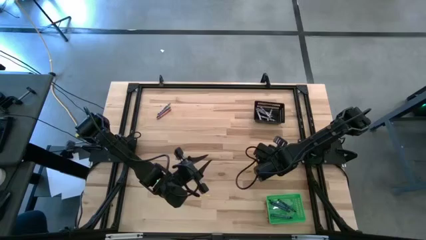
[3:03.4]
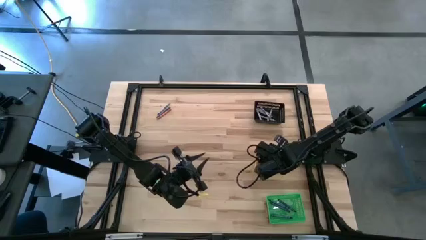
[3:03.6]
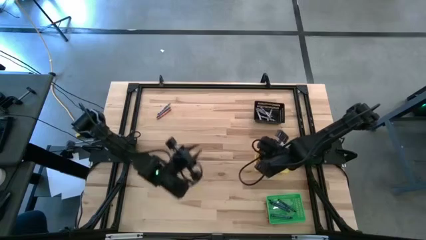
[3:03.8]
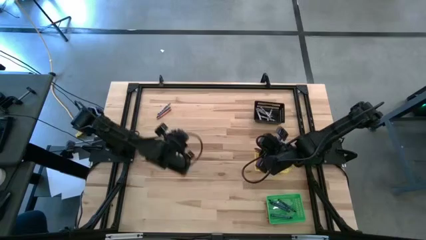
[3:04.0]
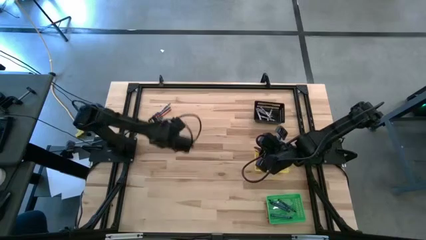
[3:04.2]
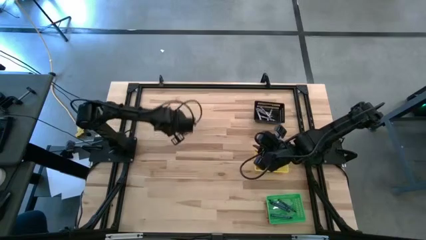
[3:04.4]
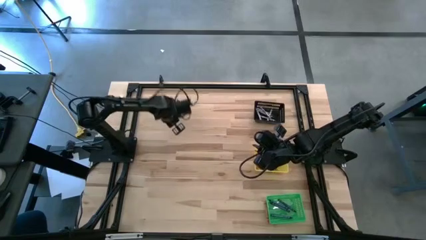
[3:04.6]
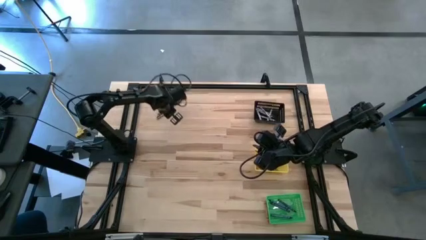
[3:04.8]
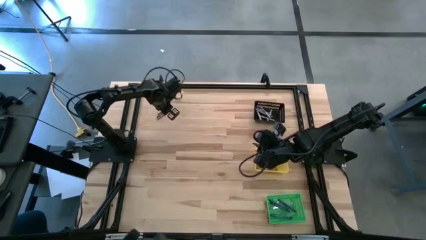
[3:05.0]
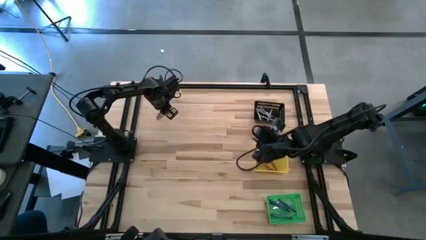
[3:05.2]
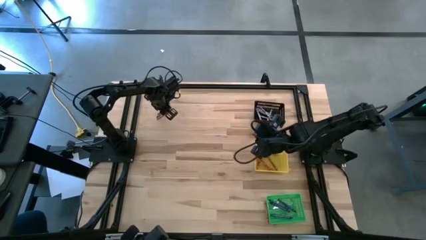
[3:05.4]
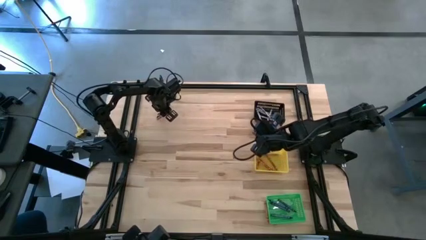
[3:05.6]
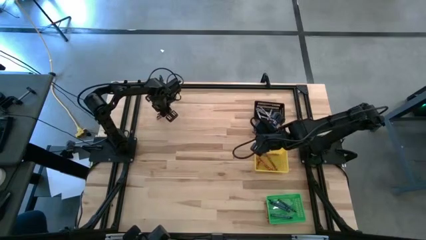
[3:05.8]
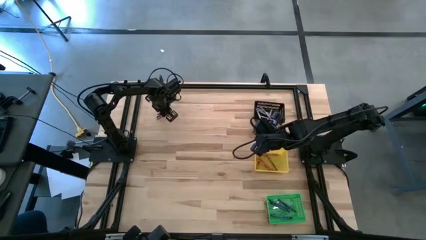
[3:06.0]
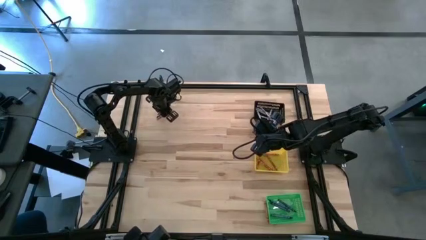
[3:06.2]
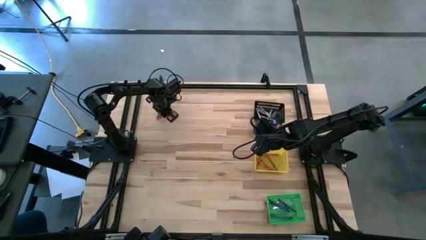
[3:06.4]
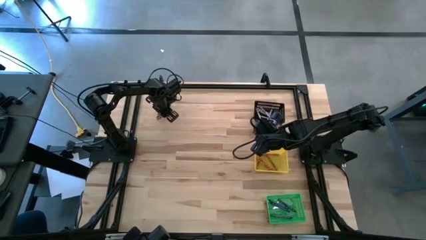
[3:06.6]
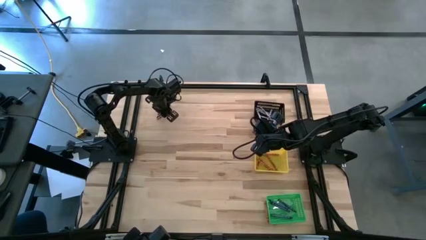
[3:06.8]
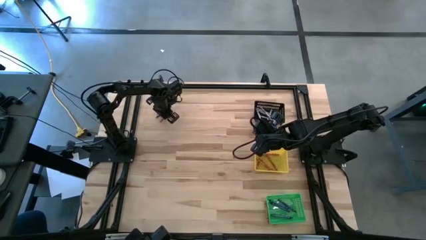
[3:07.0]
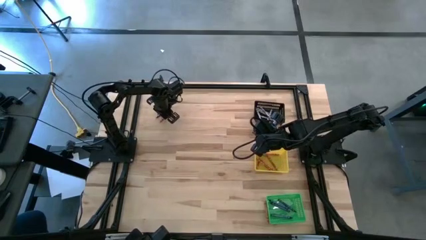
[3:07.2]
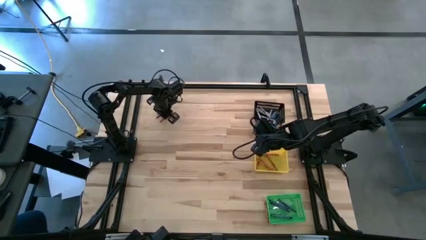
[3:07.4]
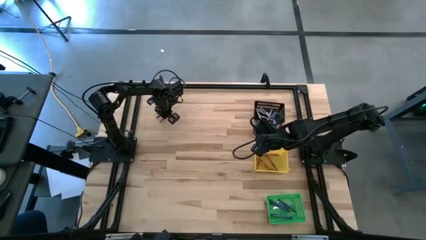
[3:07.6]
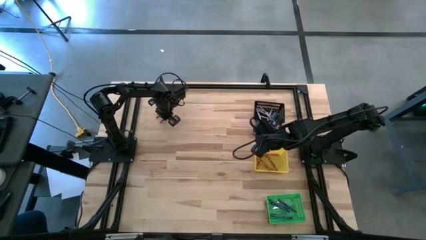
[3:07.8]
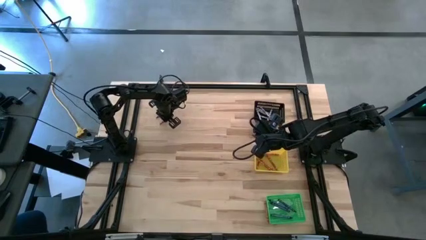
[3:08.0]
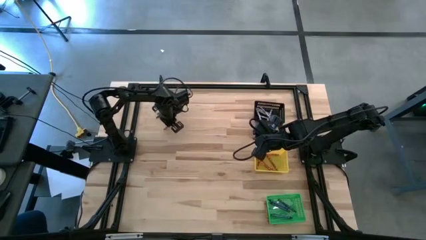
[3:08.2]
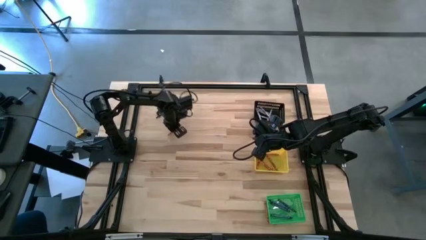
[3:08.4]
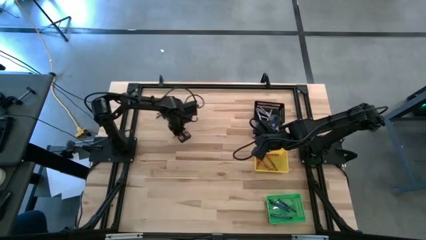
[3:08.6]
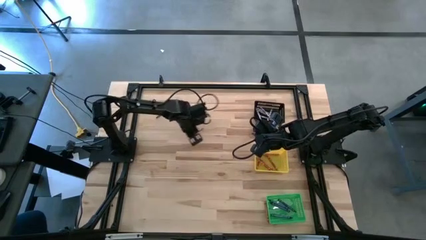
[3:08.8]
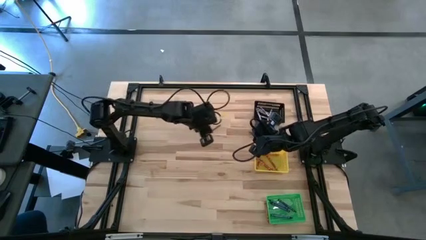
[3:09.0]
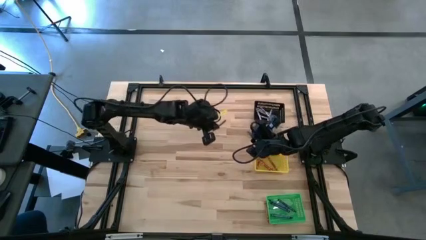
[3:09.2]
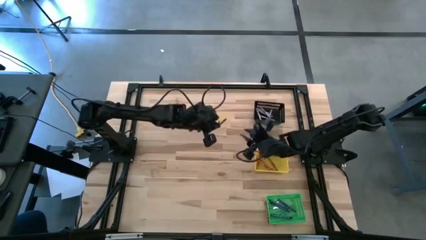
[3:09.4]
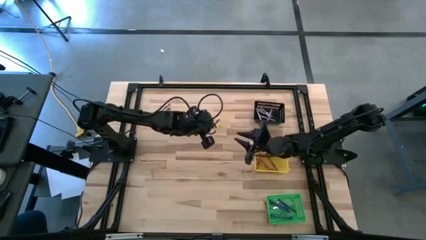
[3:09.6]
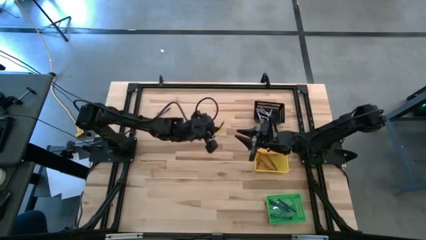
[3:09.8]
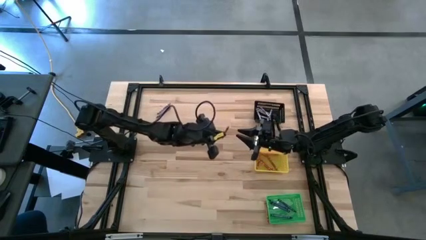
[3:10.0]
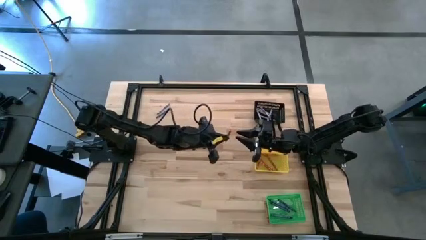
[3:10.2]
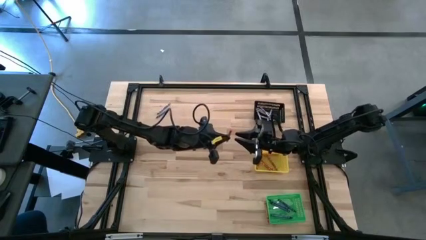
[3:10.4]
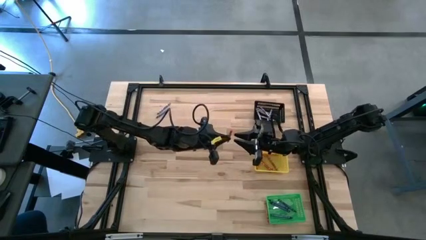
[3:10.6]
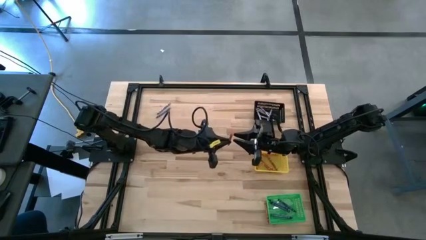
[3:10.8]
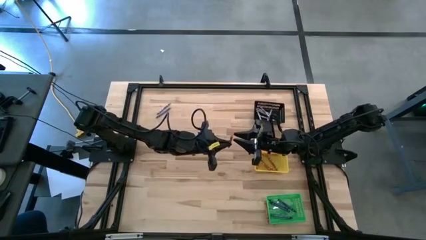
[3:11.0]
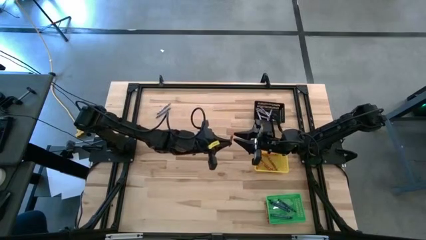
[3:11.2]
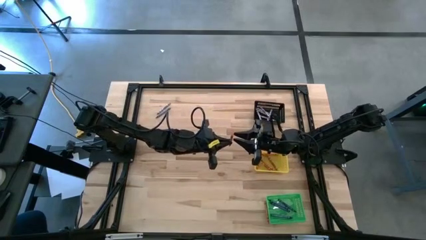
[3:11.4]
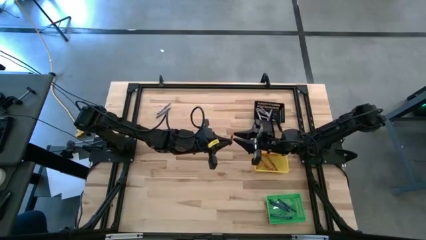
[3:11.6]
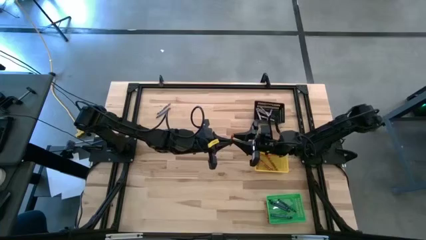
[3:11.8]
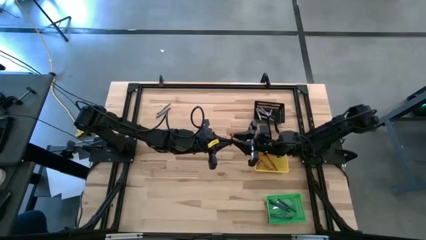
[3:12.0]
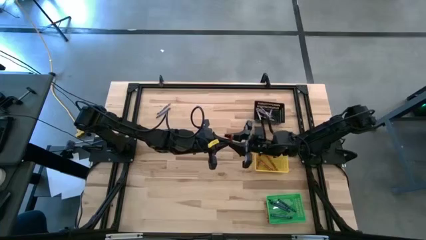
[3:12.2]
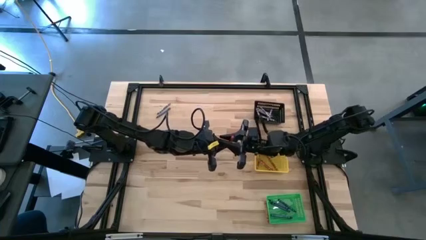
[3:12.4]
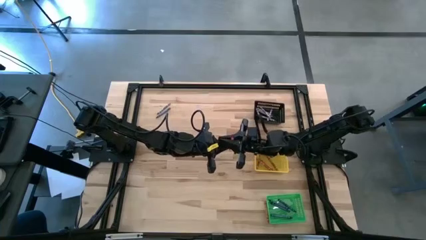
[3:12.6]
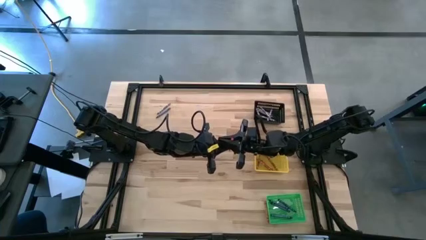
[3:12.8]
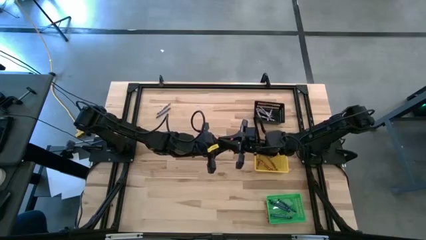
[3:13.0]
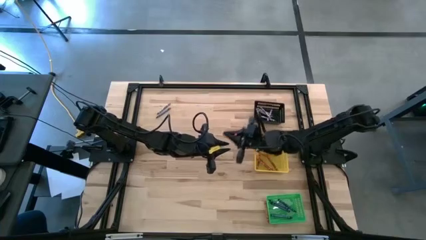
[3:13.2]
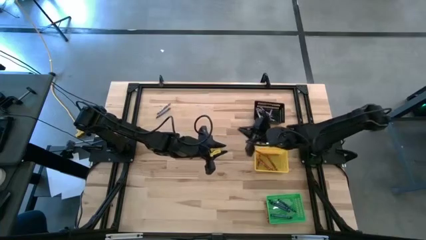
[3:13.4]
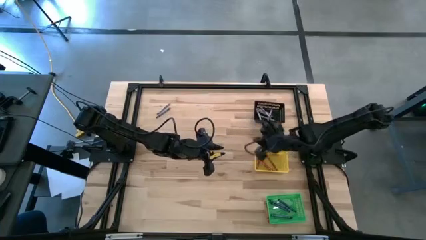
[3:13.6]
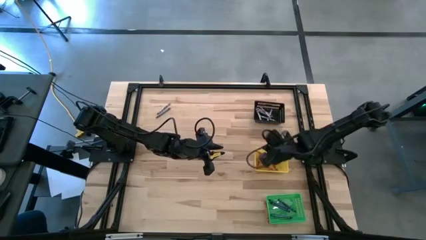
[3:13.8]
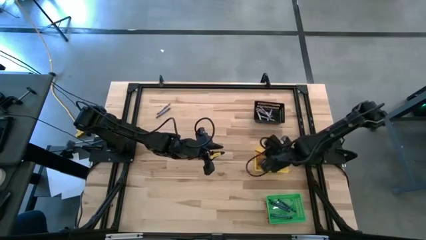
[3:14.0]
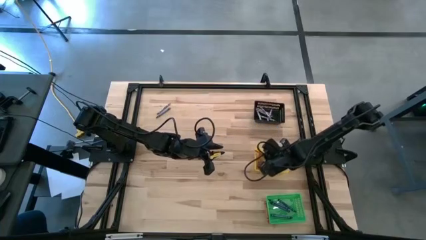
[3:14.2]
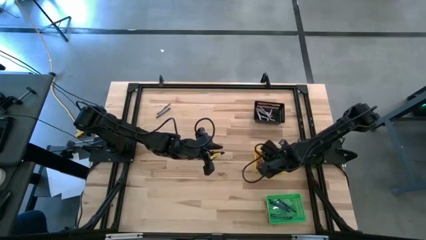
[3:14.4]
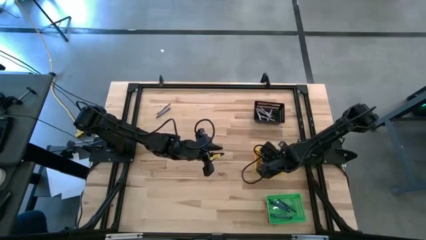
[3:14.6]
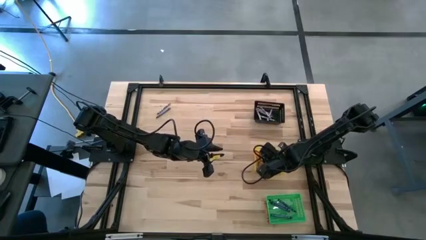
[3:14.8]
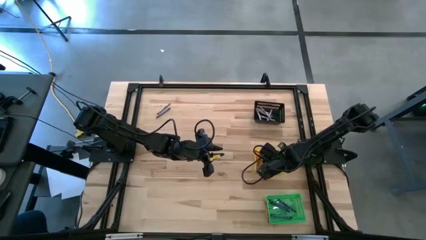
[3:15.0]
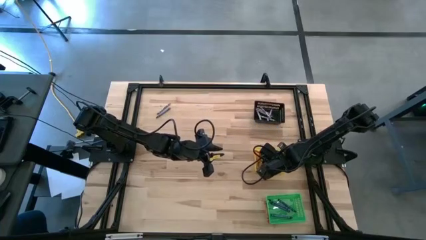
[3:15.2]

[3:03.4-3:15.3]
Task: Sort crayons
Put the orange crayon into the yellow basket

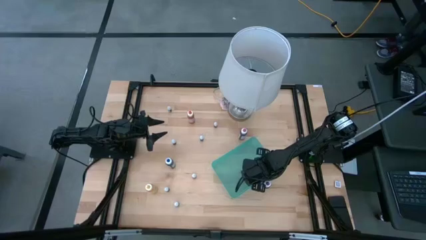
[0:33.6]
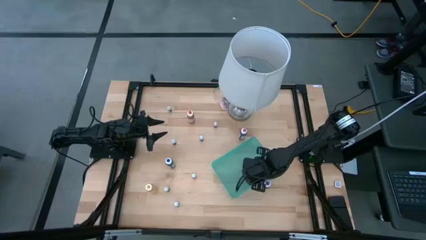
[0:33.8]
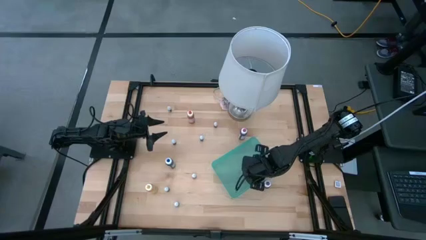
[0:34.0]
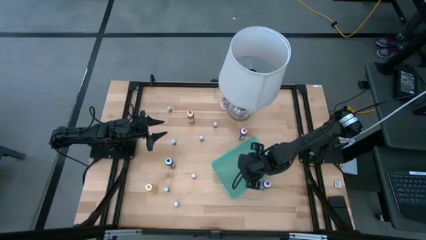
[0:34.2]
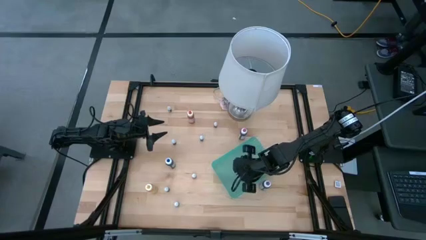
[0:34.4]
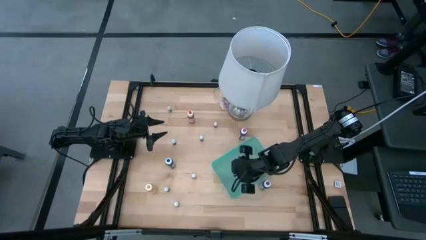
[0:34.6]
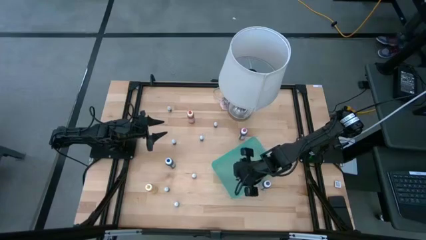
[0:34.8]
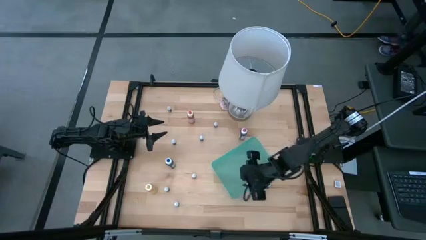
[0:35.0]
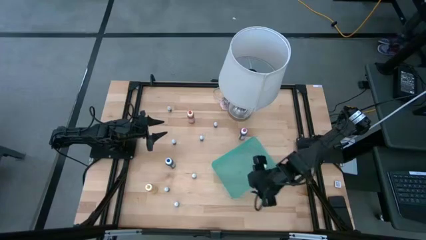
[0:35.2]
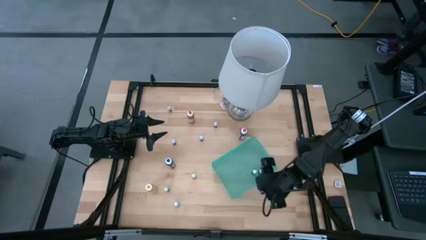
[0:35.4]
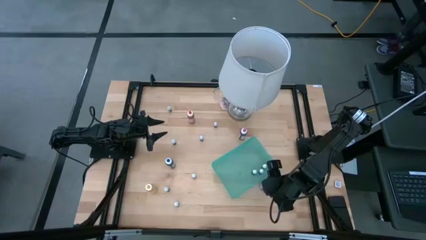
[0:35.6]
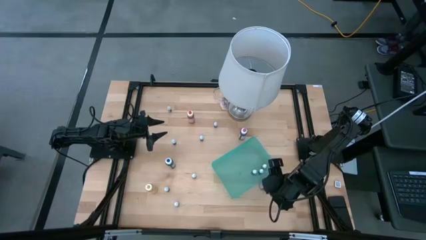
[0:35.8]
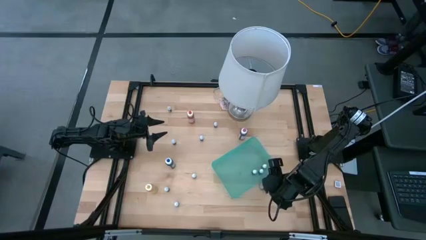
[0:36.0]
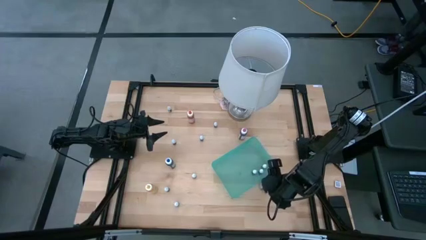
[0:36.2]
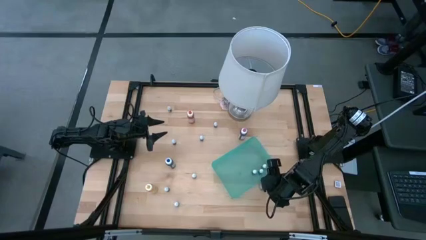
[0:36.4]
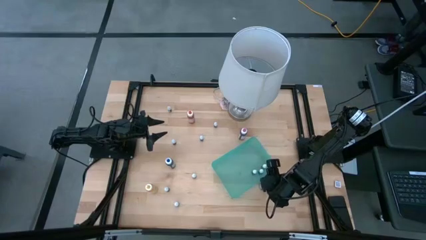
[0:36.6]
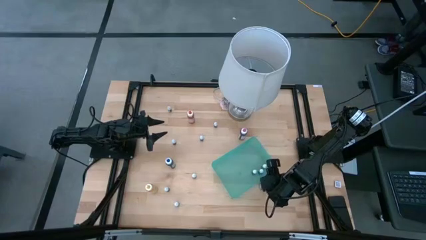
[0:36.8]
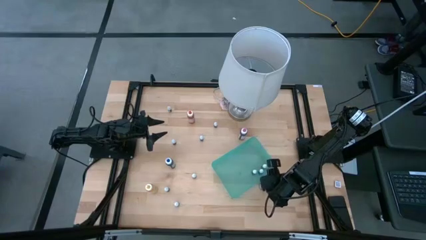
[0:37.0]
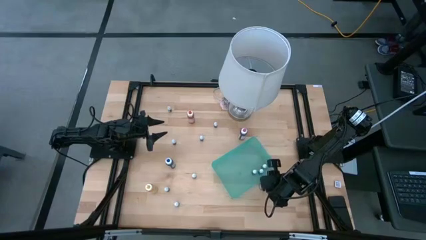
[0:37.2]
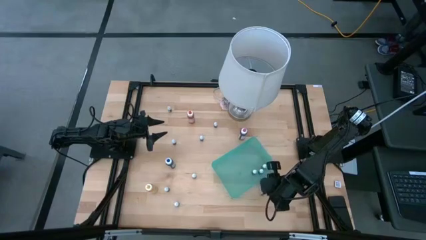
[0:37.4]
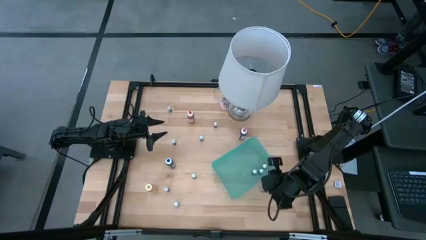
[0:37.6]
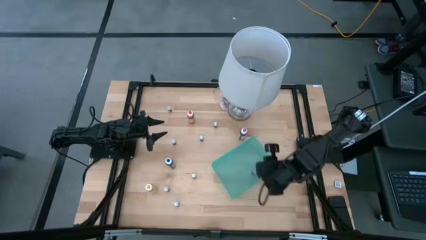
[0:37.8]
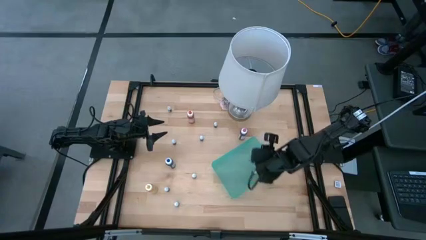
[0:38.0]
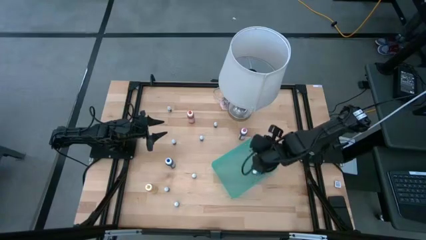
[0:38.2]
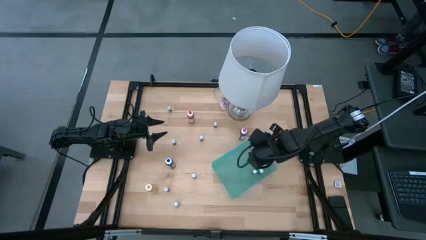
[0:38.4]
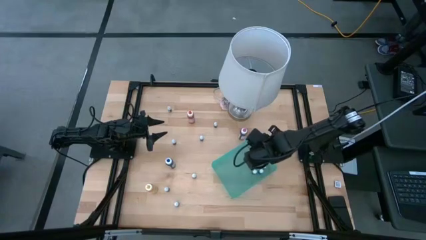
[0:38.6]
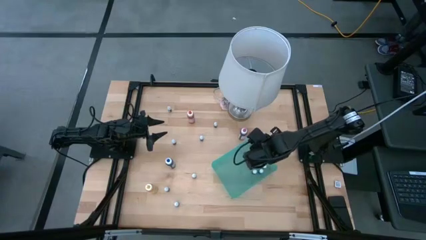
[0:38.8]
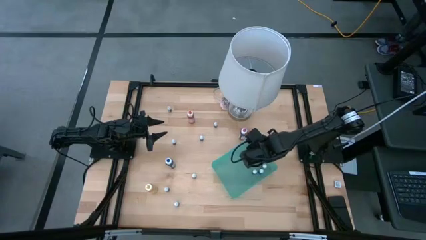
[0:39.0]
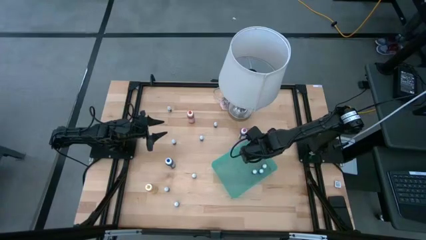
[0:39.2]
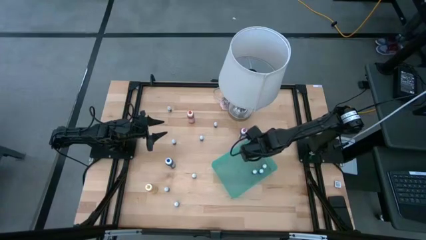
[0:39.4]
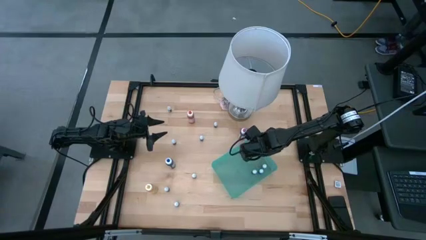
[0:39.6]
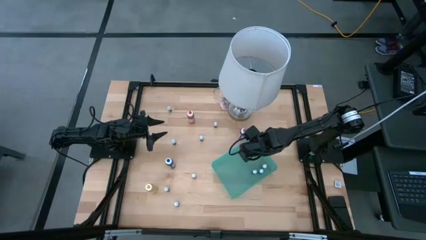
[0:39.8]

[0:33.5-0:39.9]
Task: Pick & Place food coloring
Put the large purple food coloring bottle into the green bin
